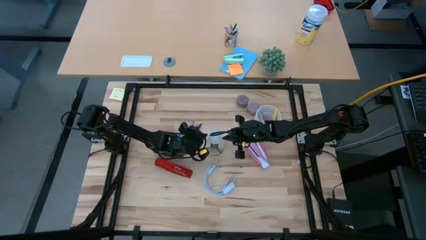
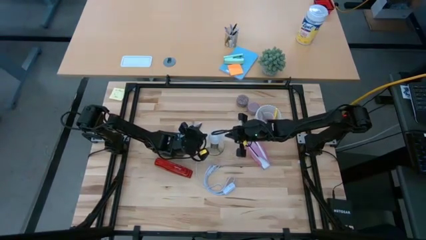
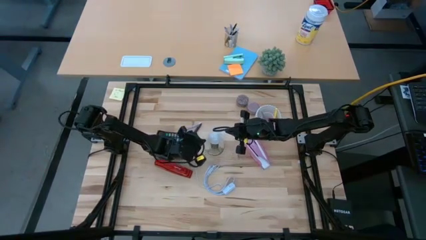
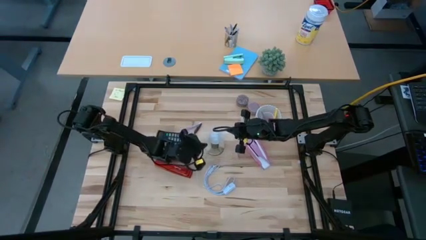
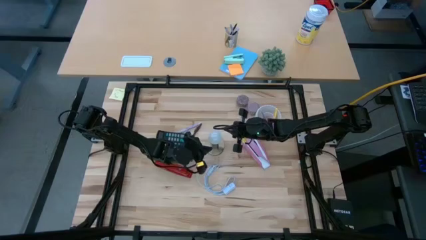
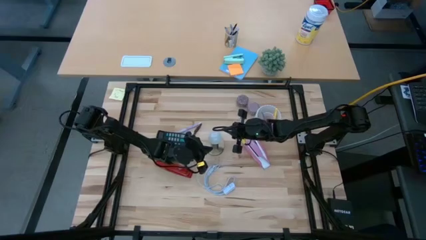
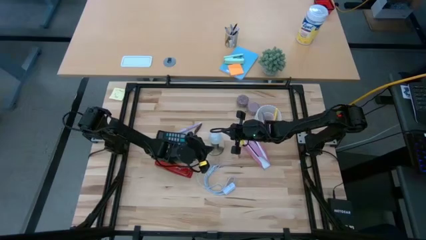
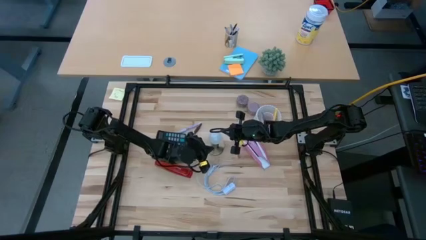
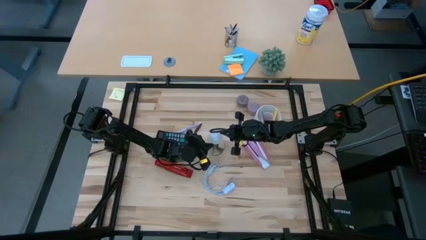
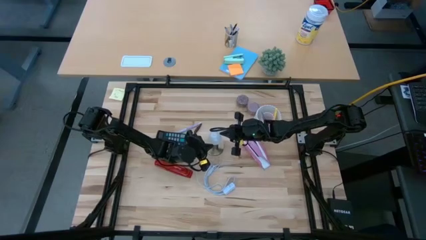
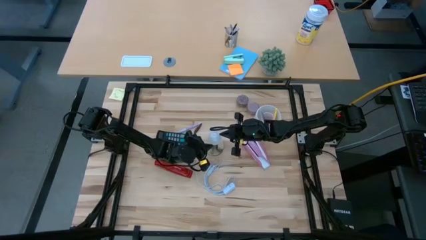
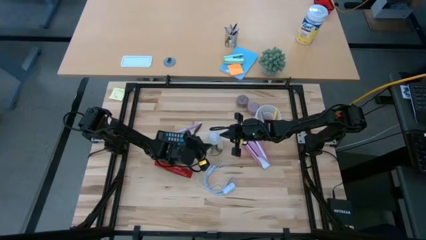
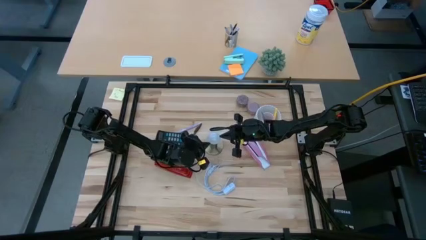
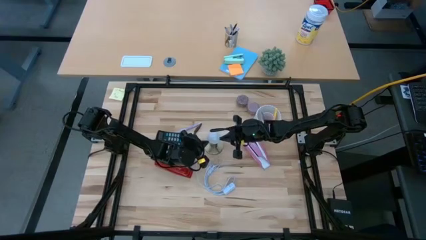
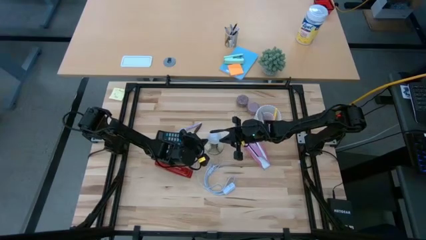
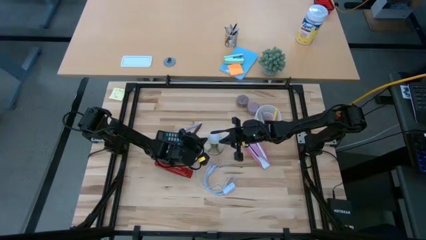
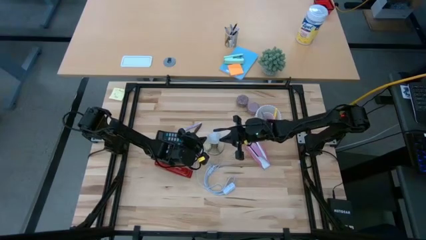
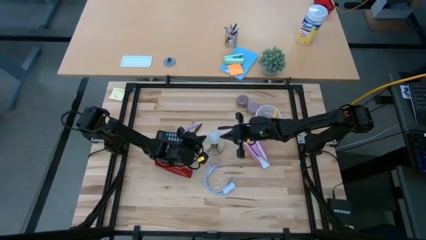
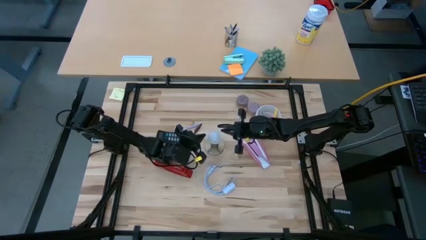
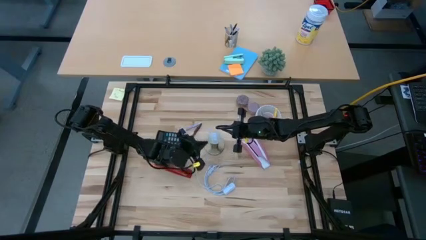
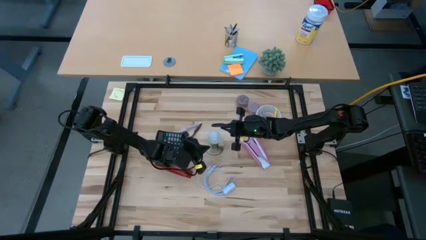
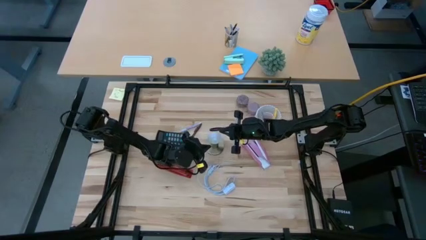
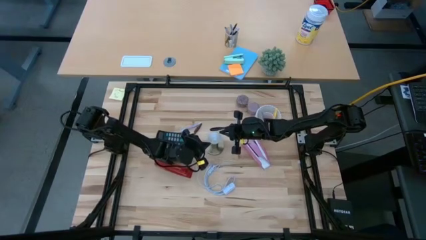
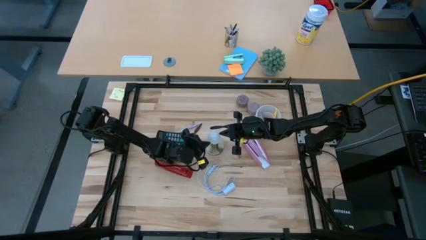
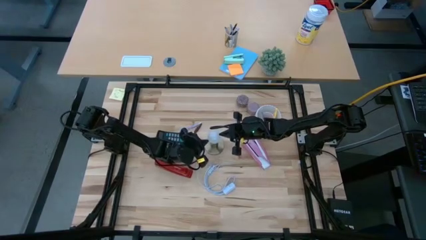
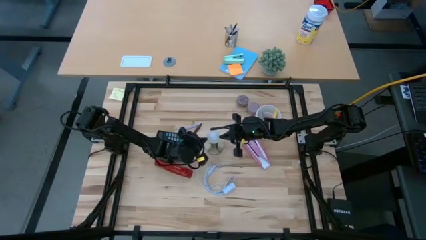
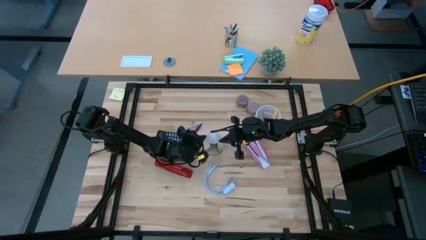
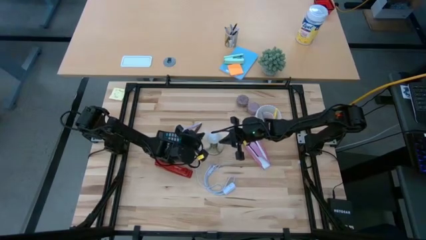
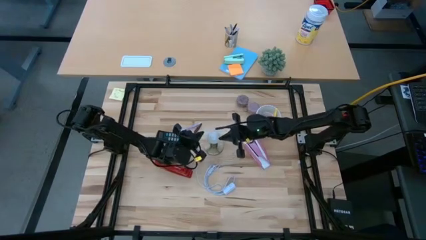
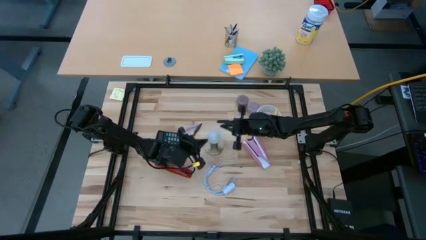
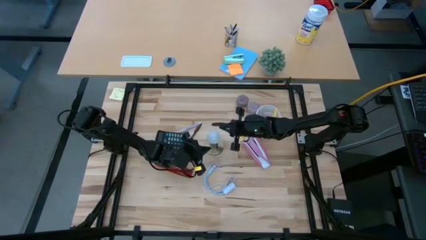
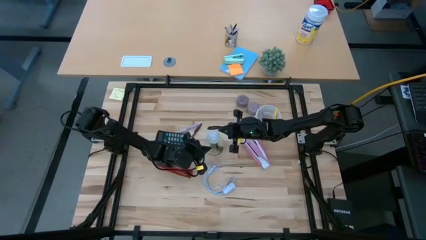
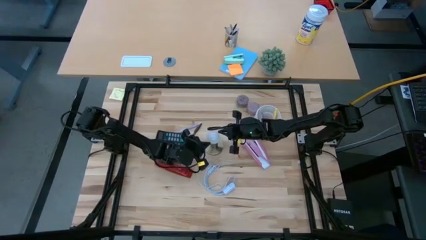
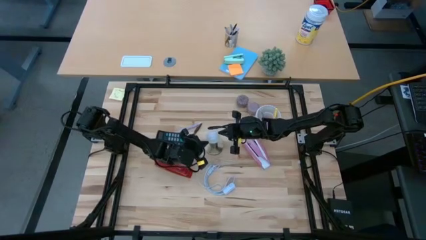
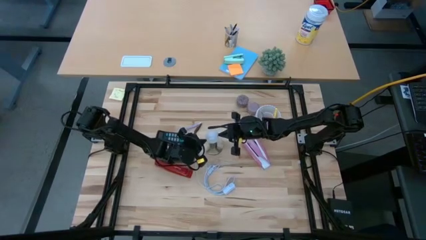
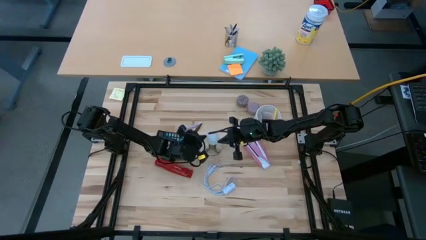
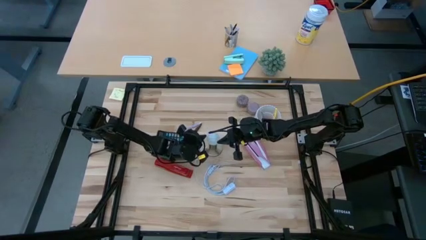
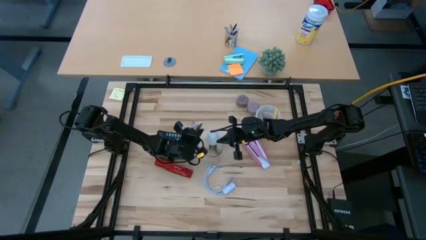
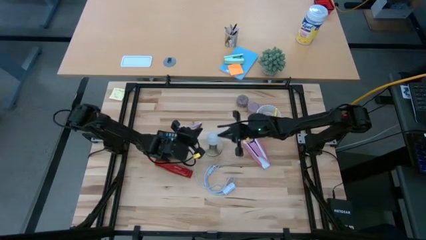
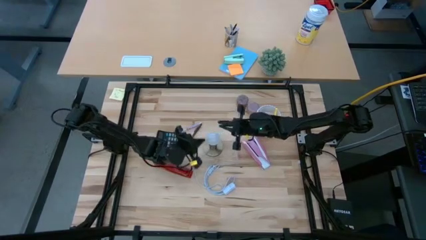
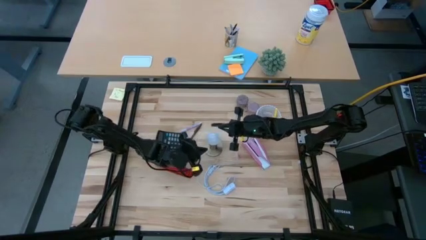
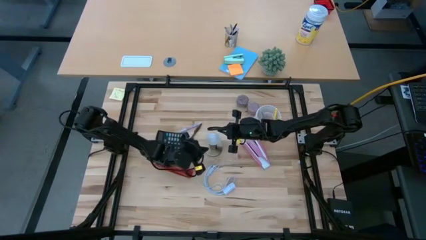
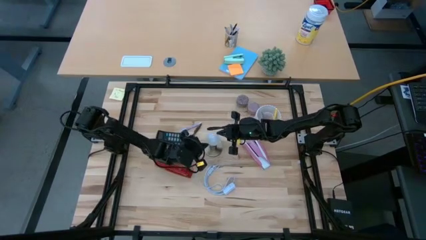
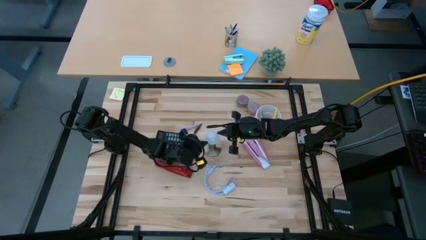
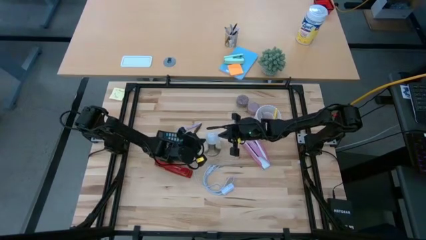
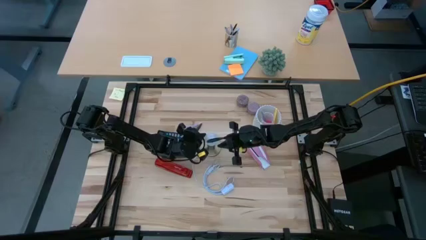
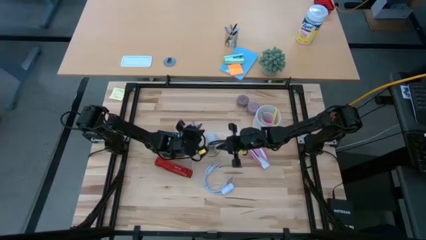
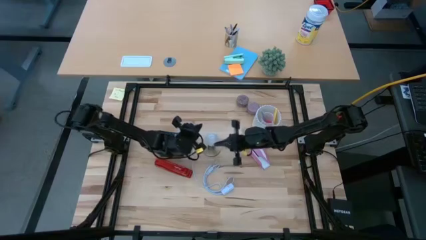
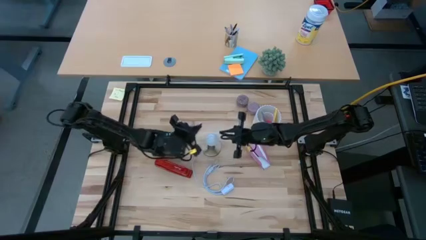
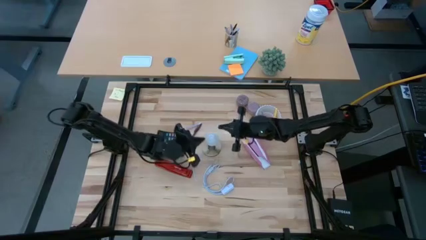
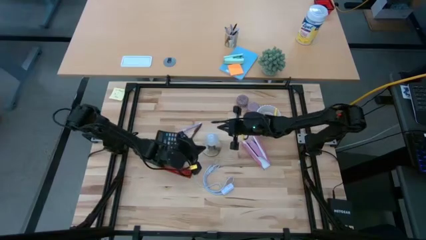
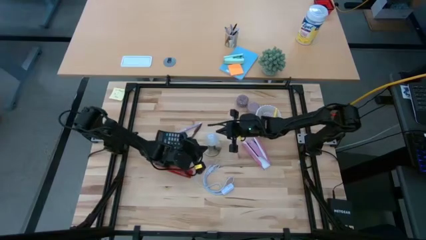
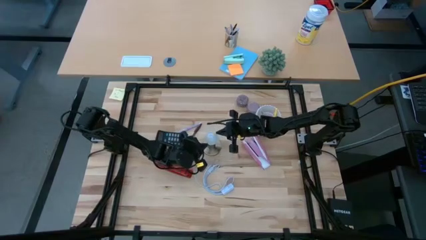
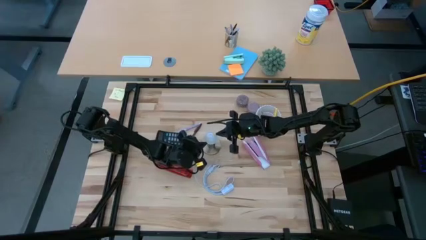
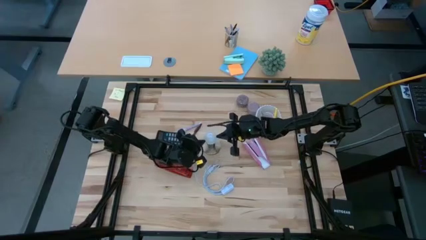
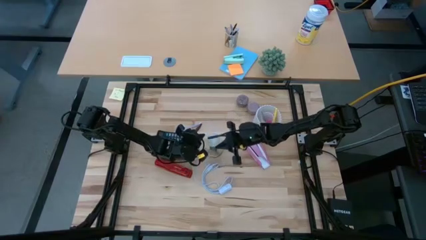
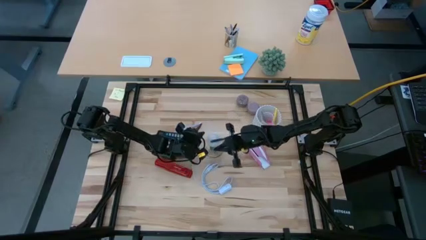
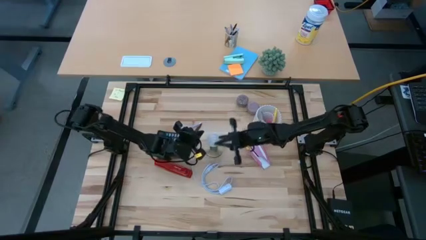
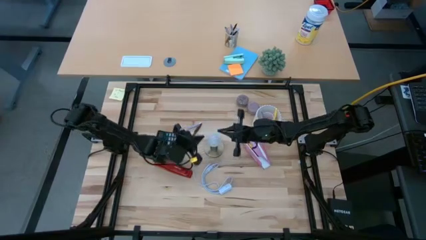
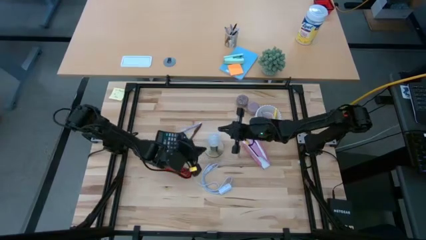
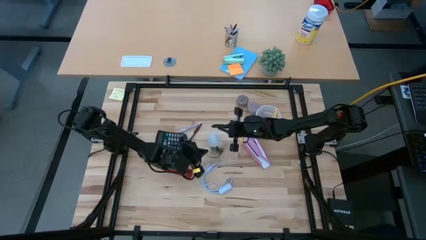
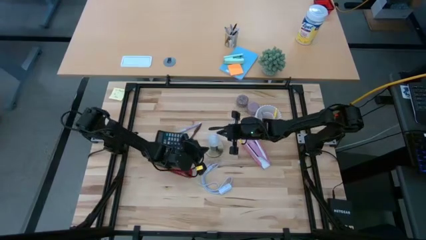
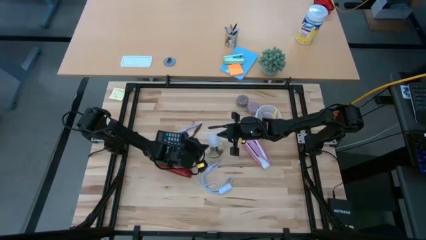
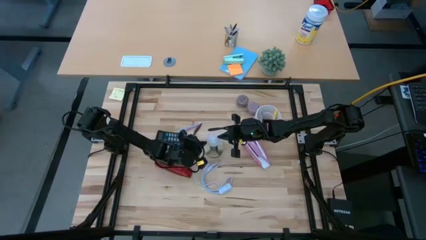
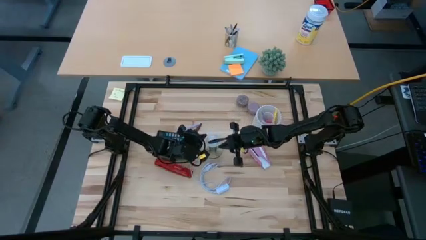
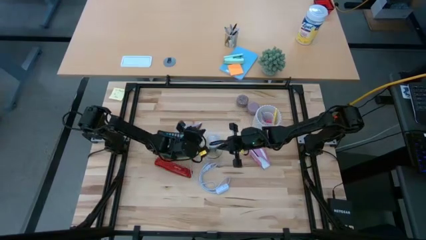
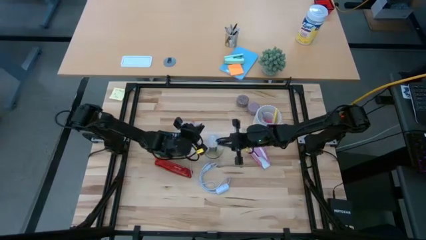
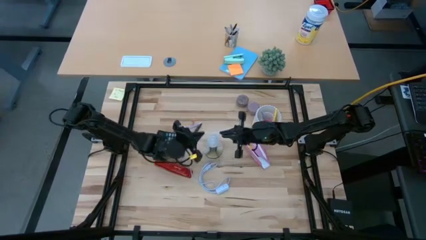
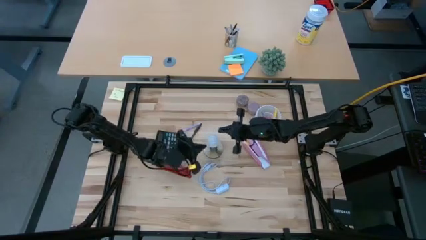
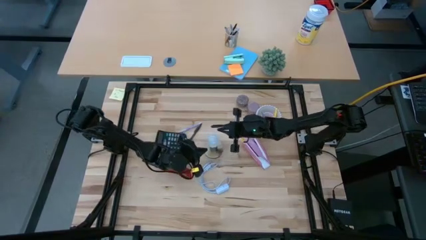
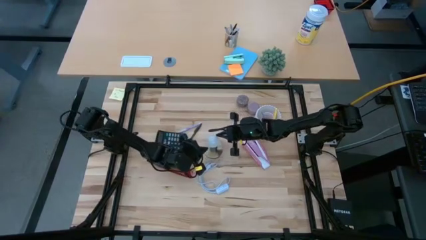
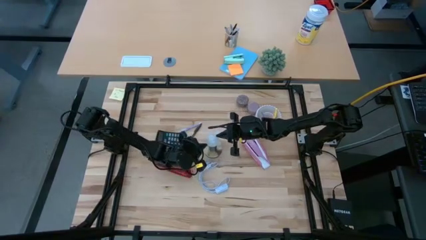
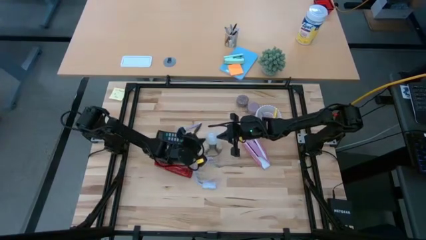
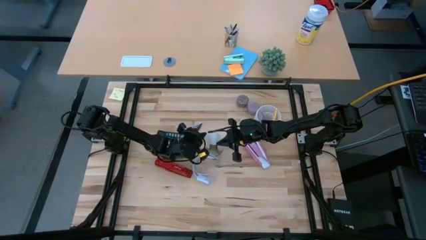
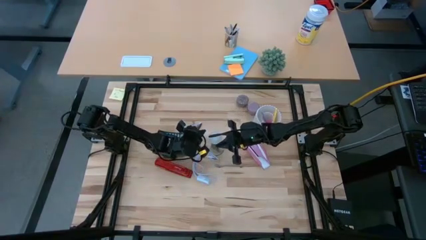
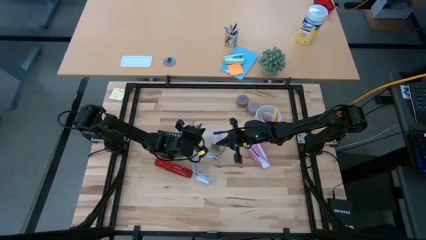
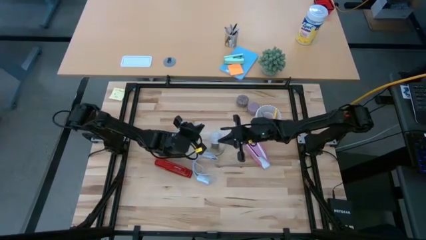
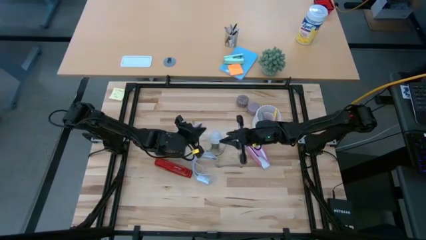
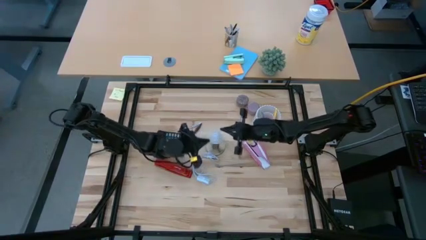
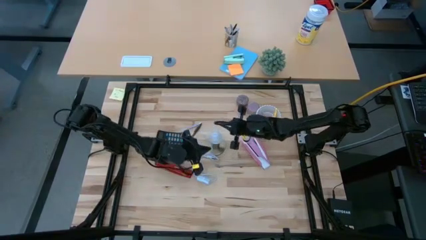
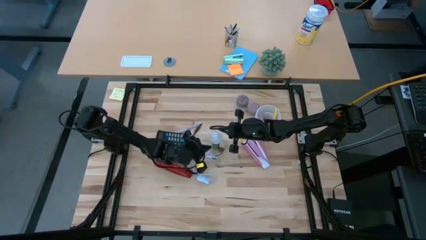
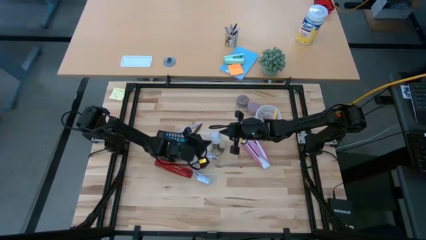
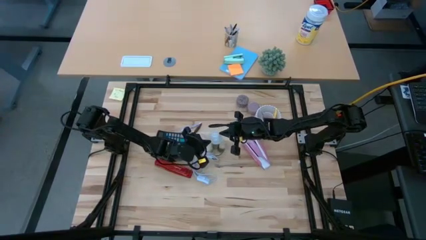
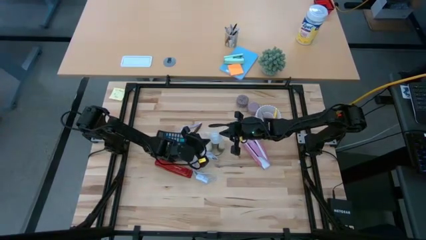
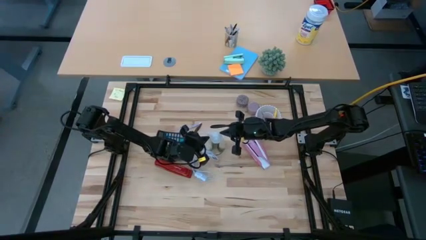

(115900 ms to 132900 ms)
Task: Screw lightbulb
Insert the white lightbulb into the golden lamp
